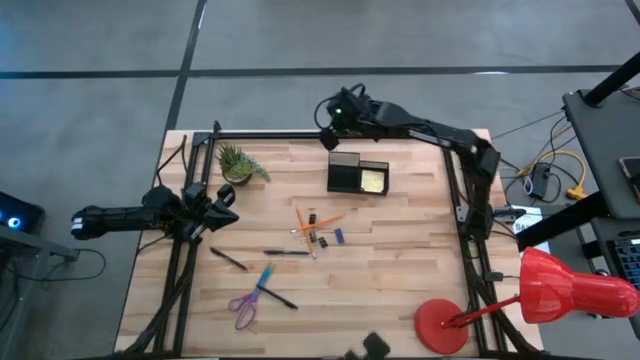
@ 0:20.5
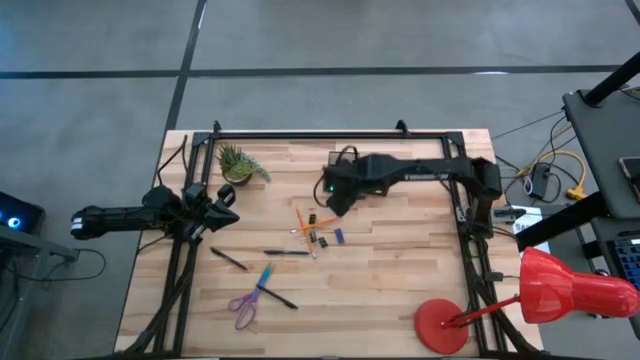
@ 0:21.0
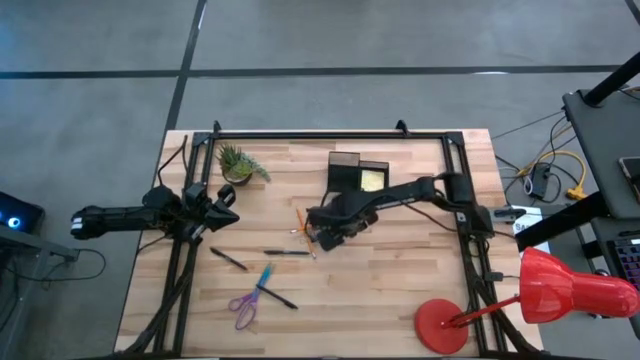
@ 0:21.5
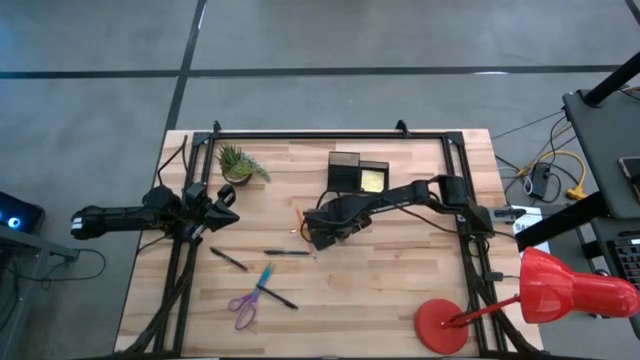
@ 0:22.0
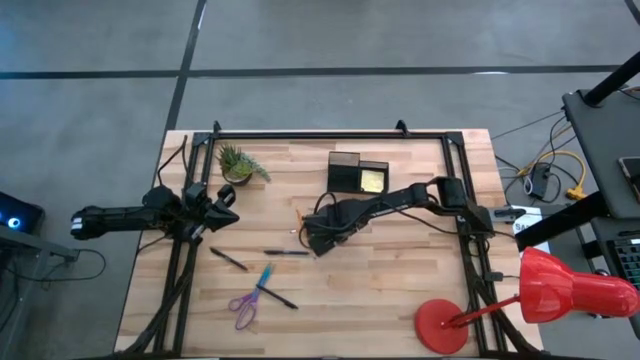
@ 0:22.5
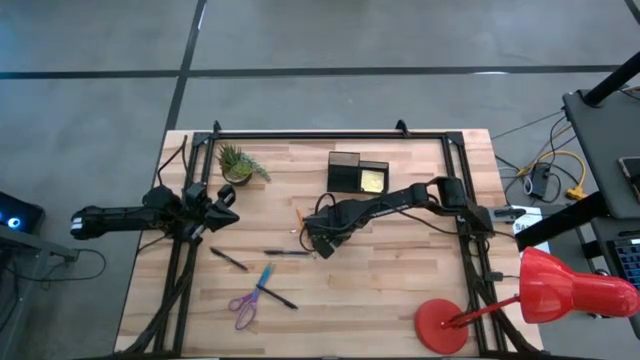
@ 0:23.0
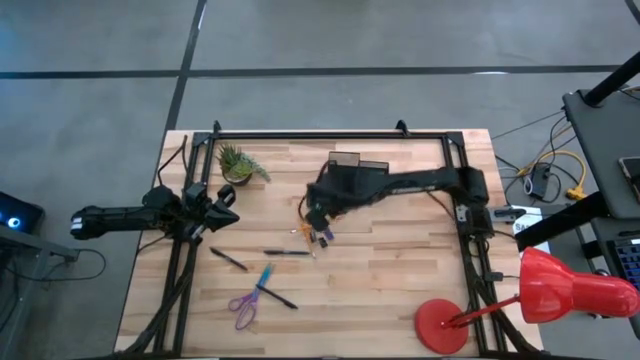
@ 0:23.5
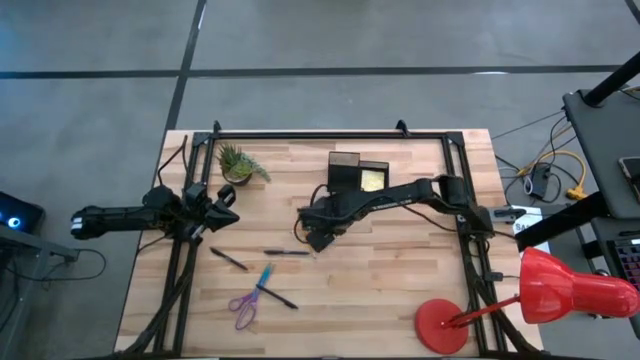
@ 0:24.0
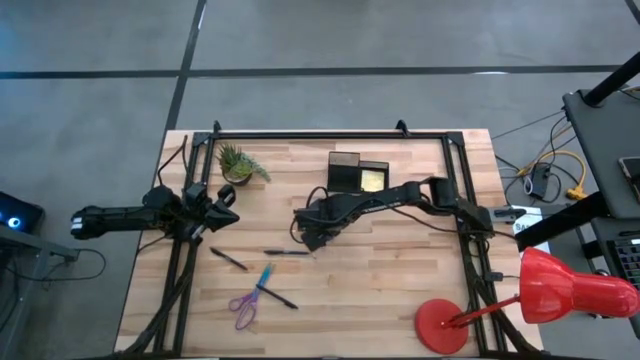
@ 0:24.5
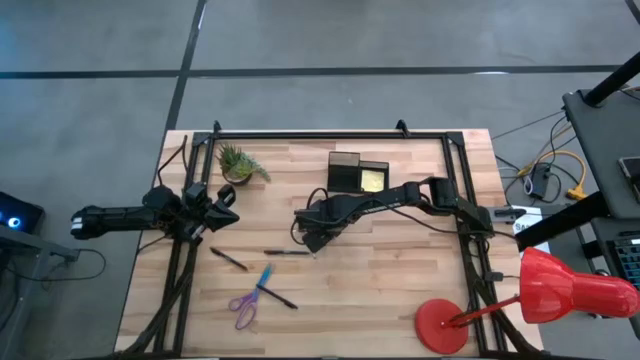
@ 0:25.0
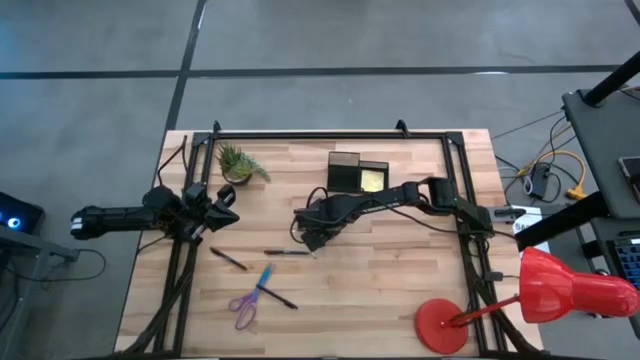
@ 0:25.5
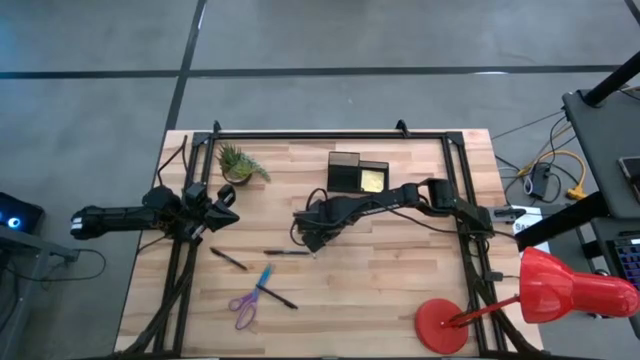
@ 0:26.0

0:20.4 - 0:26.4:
Task: Pick and place office supplies into organizer
Put the blue eraser into the black desk organizer

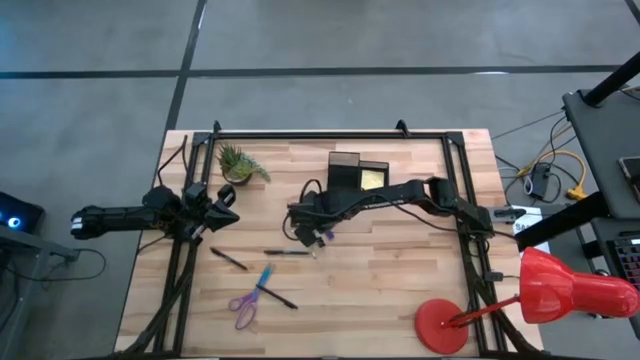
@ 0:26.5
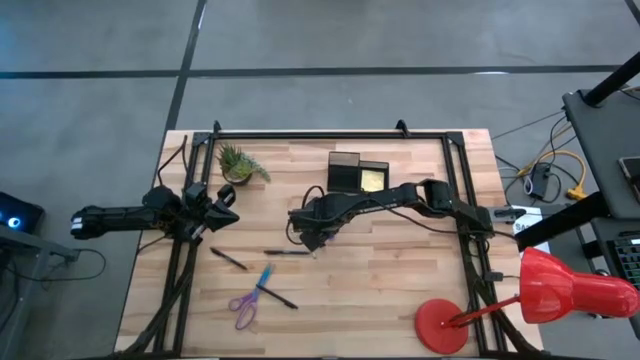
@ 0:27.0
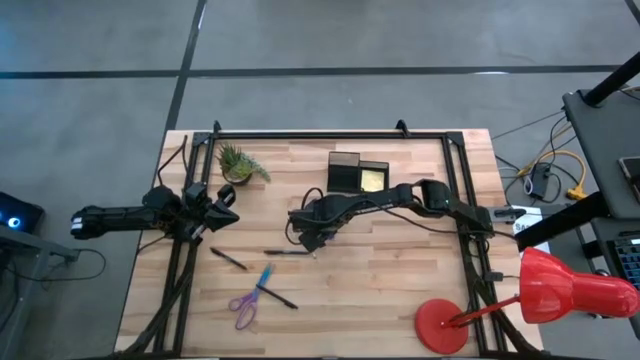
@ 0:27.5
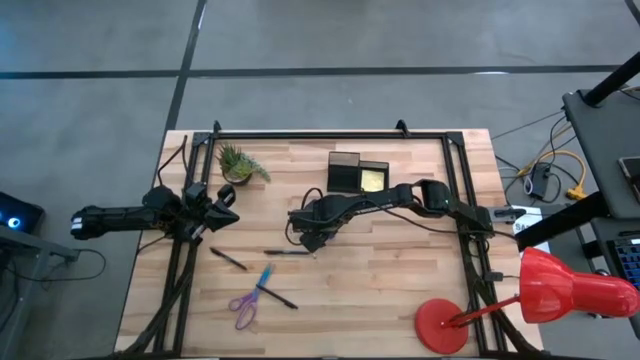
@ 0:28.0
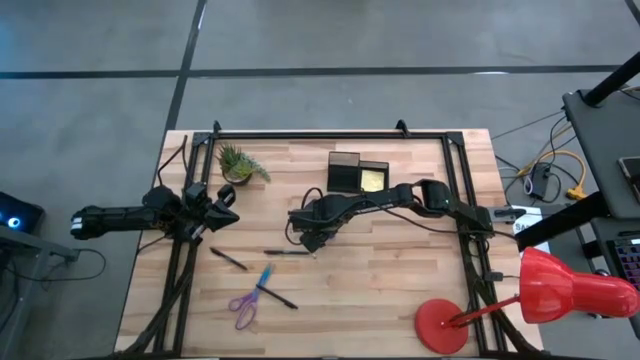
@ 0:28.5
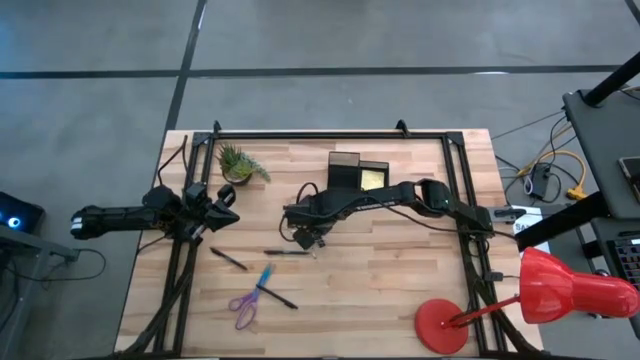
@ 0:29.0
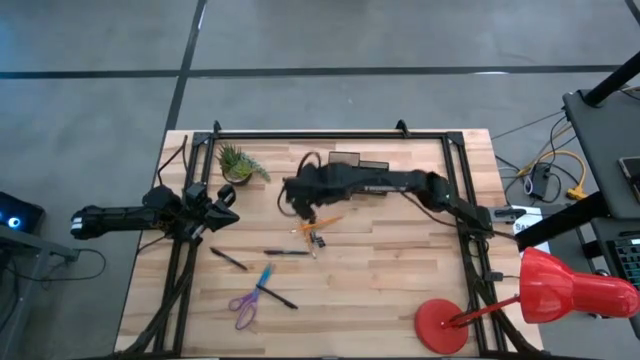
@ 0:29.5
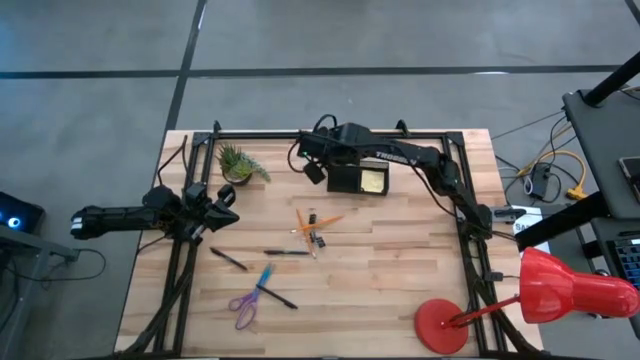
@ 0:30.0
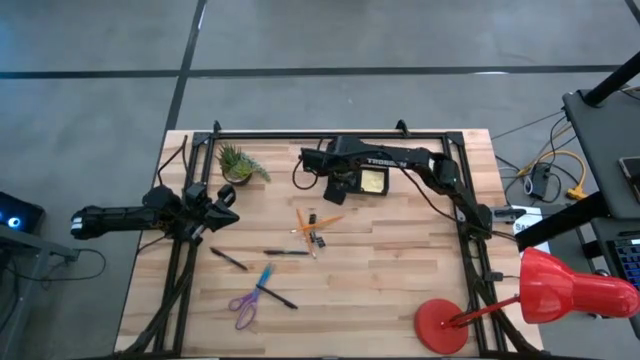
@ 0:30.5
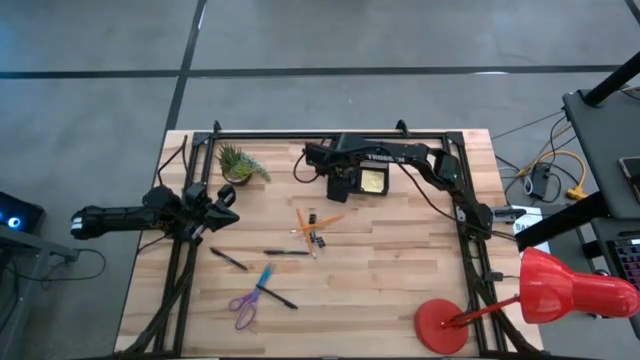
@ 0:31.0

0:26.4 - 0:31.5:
Put the blue eraser into the black desk organizer

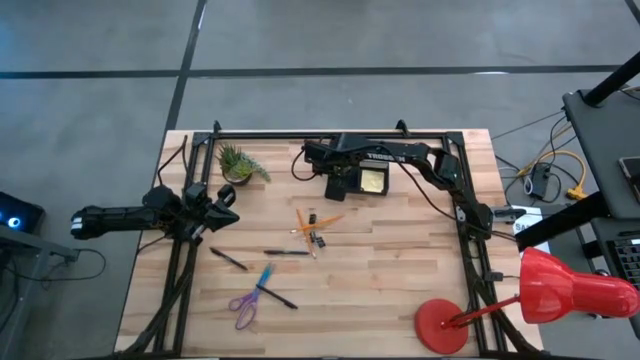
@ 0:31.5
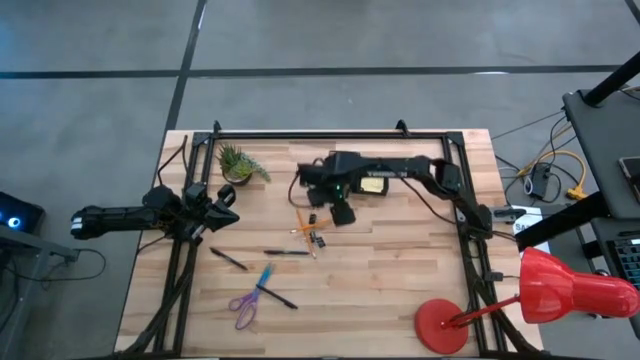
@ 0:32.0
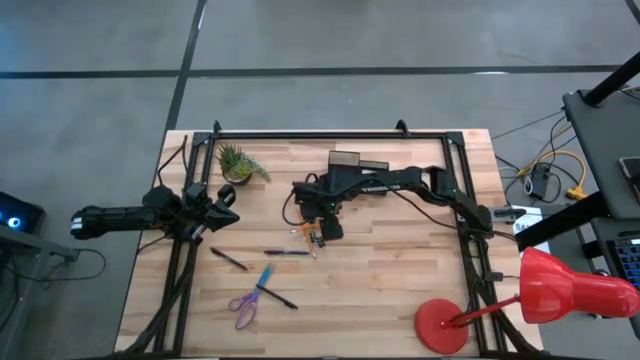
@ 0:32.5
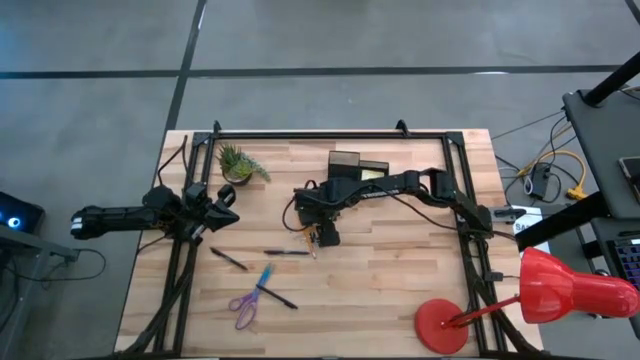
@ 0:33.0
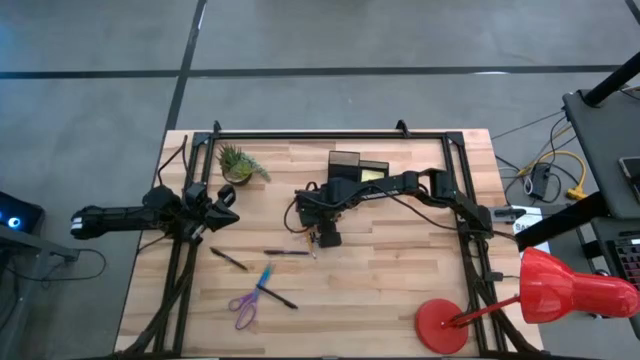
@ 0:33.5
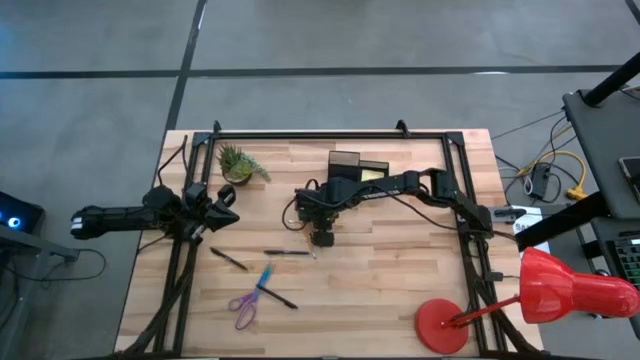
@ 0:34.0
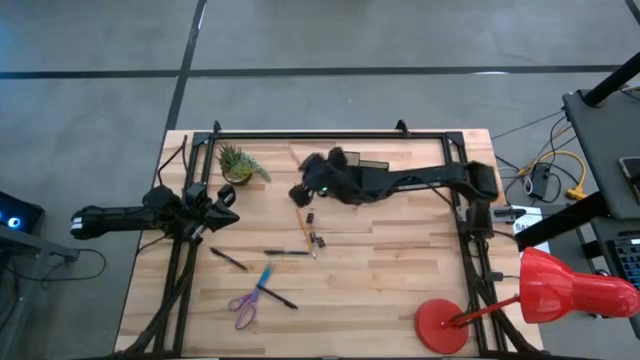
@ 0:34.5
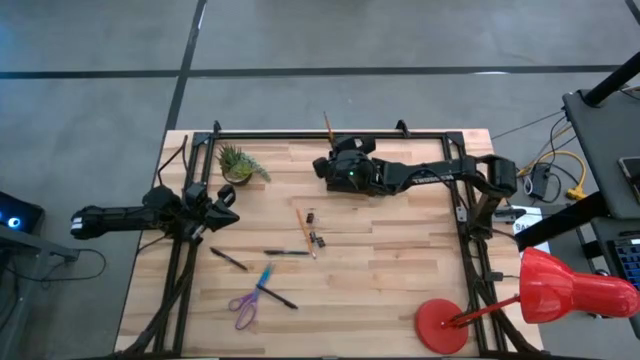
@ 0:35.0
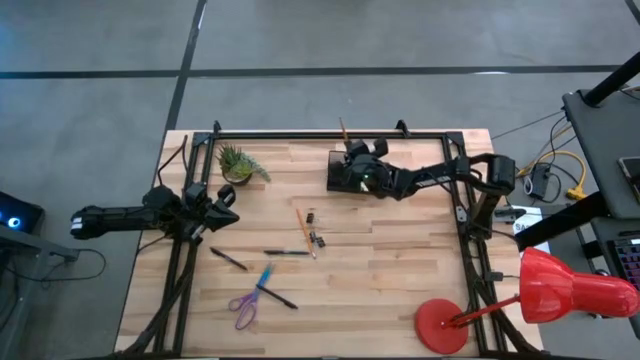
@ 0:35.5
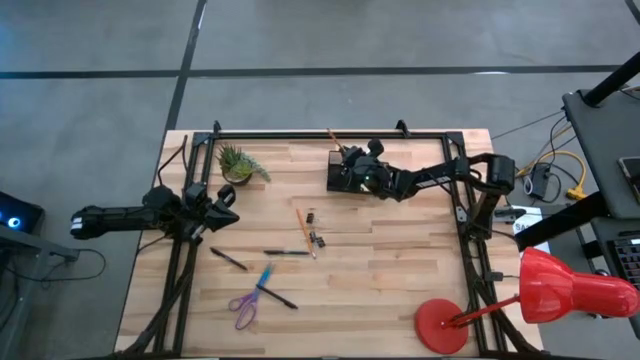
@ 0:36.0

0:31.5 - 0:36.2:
Put the top orange pencil into the black desk organizer

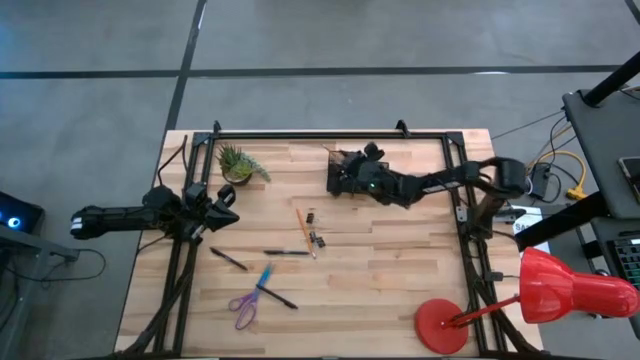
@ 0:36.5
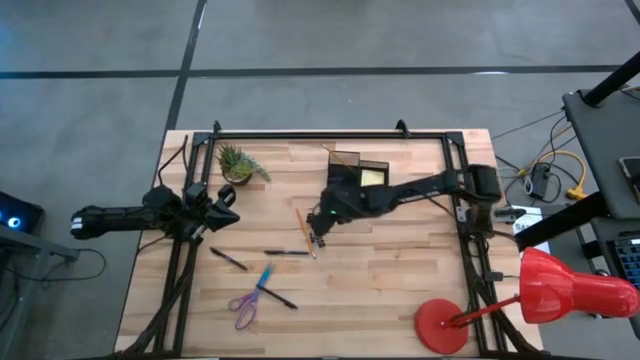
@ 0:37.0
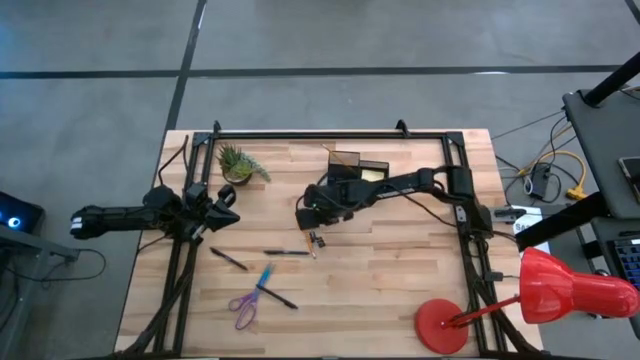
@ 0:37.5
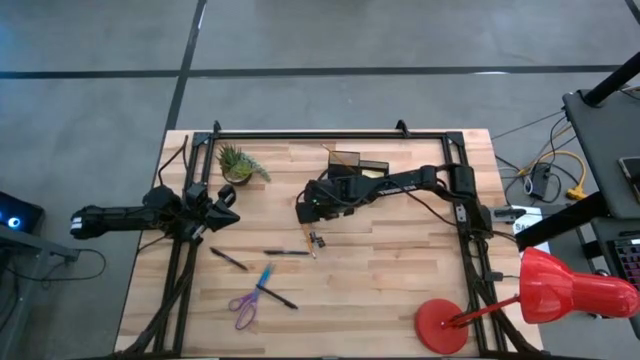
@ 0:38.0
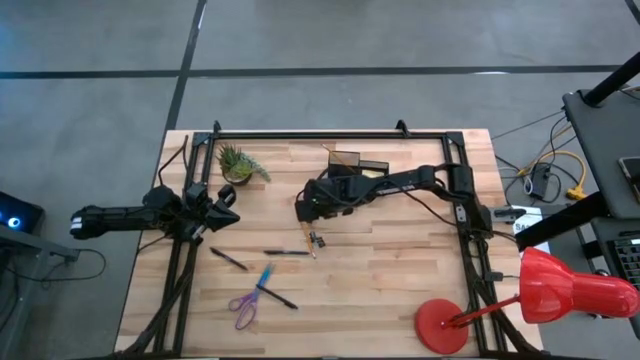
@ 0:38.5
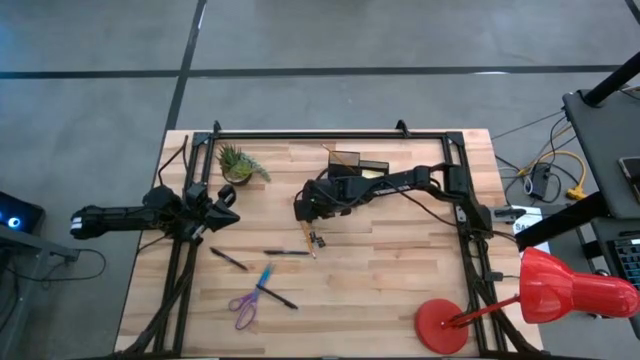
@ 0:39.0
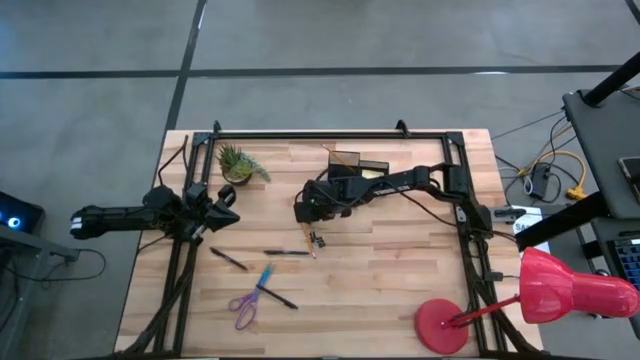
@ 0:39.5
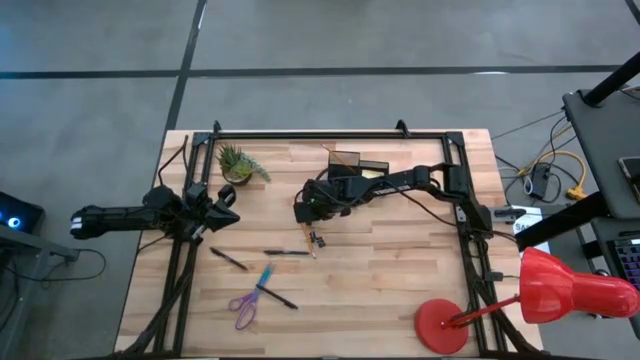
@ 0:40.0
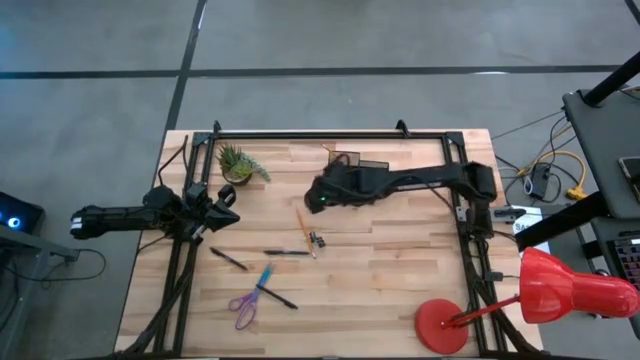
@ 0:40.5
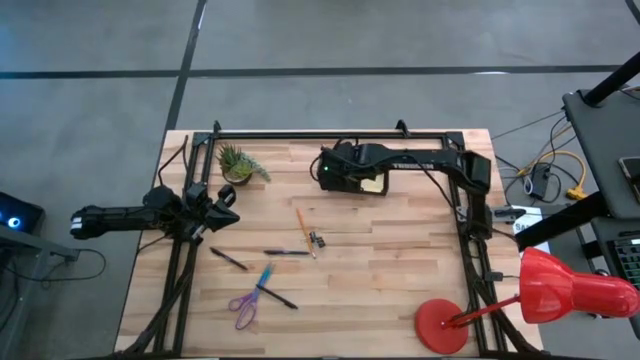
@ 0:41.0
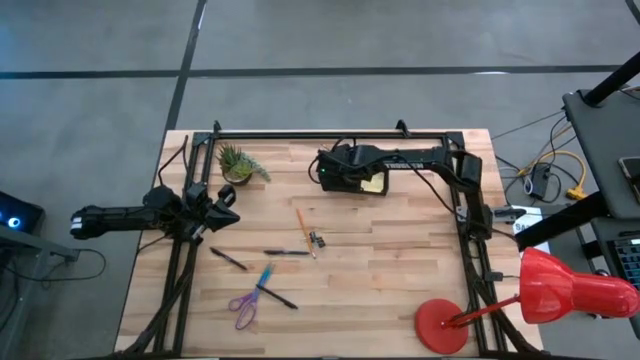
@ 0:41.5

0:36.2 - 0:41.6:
Put the top black binder clip into the desk organizer
